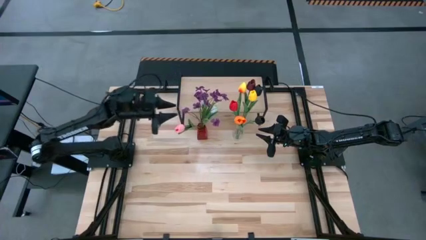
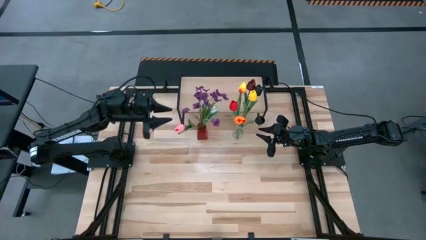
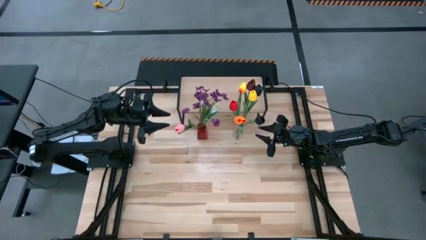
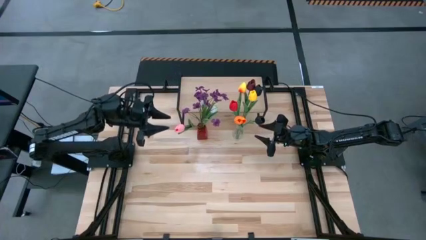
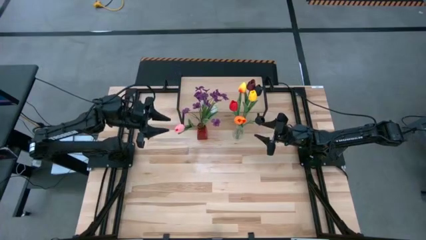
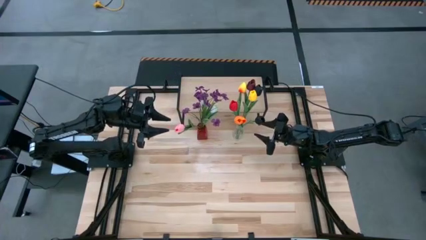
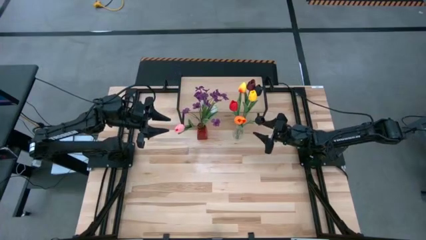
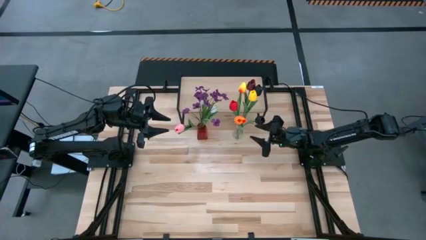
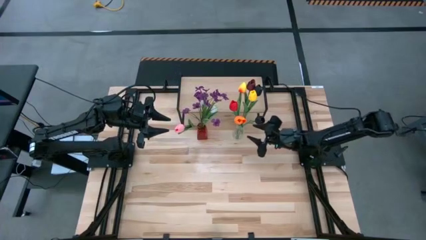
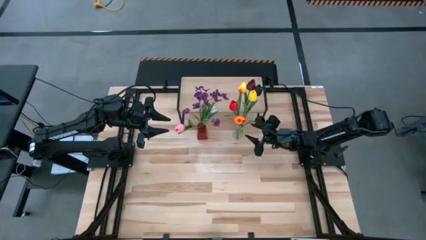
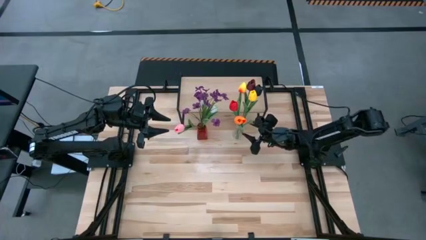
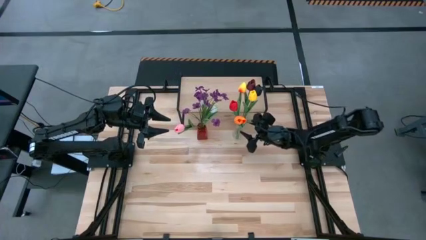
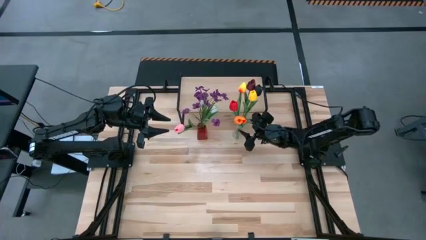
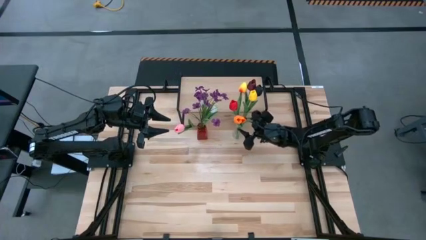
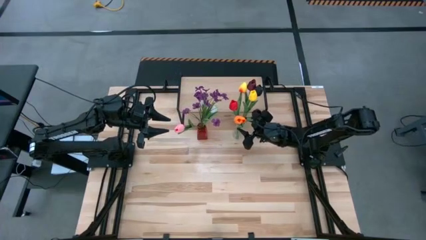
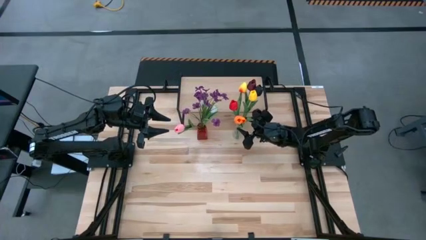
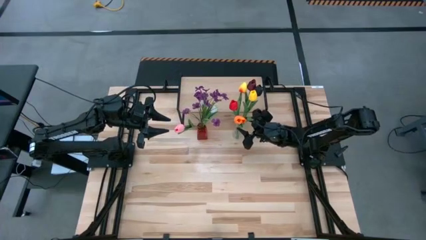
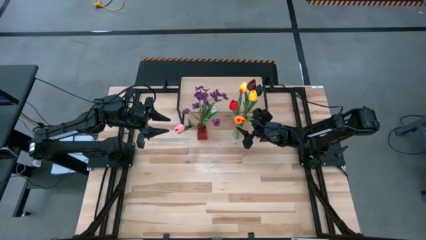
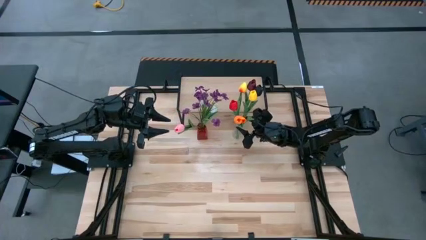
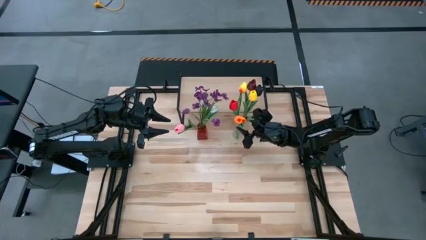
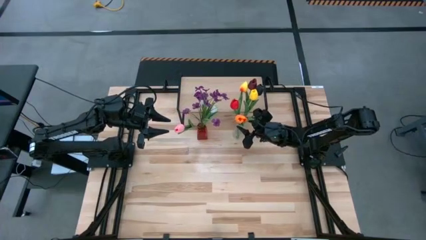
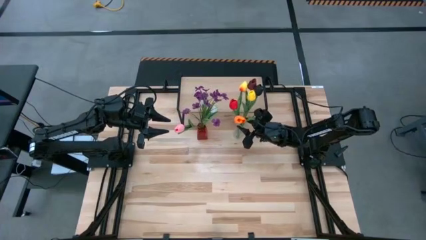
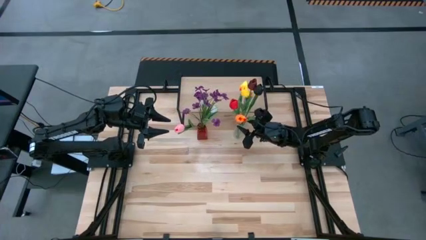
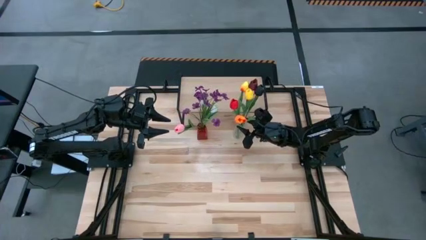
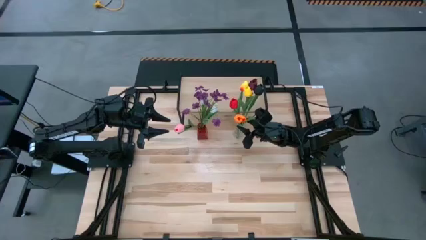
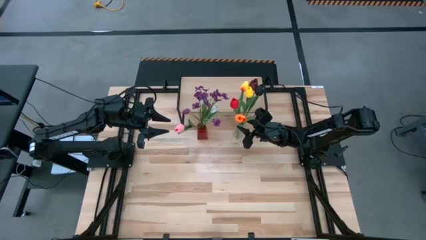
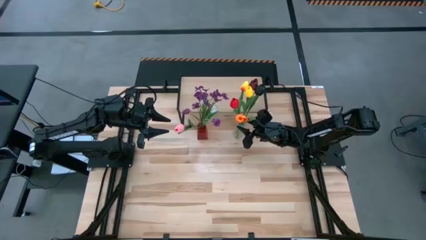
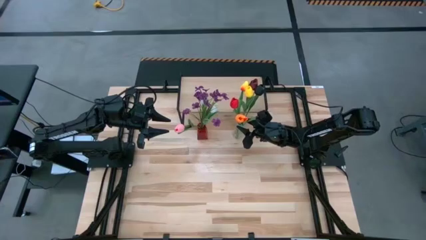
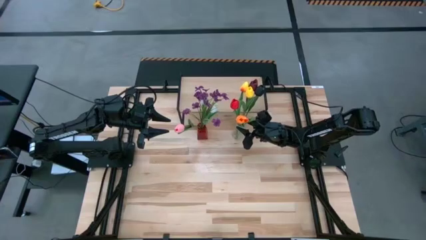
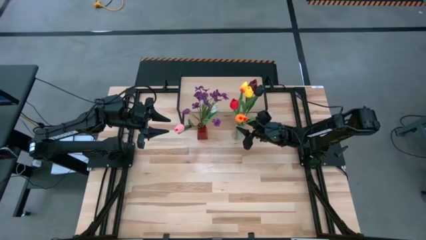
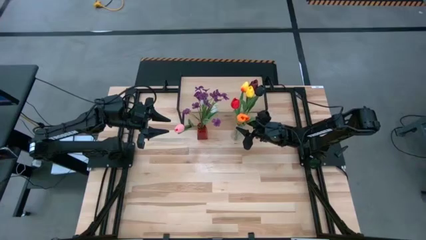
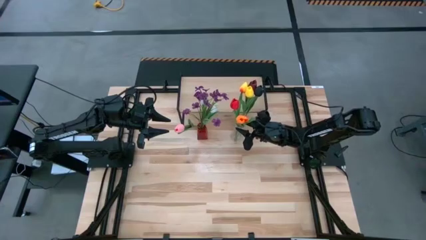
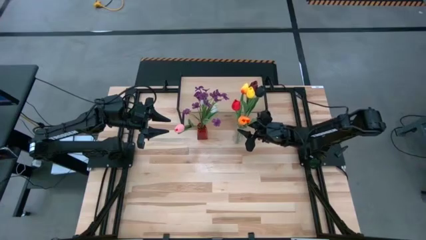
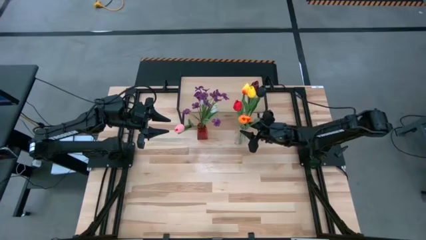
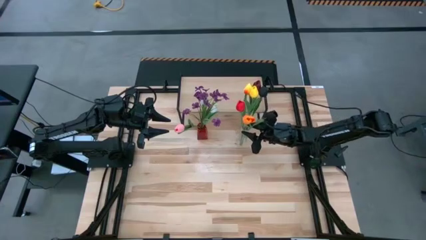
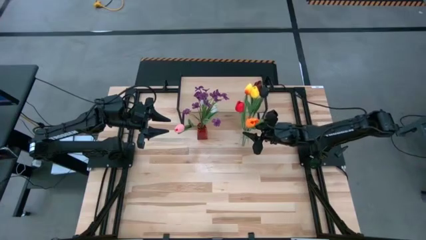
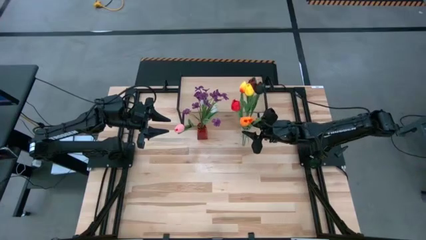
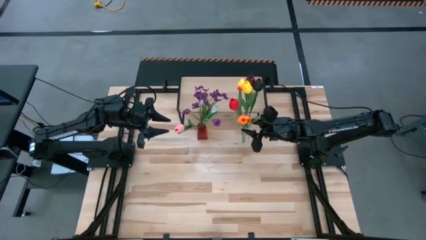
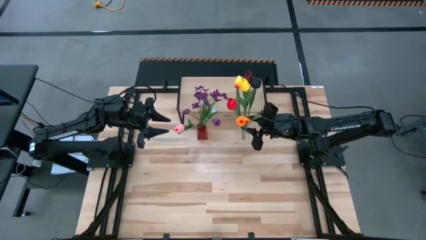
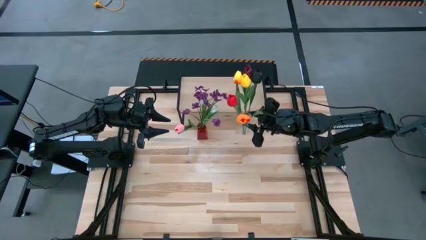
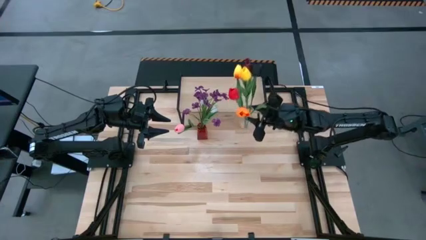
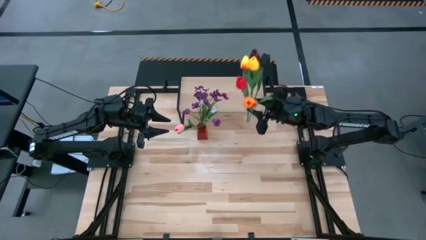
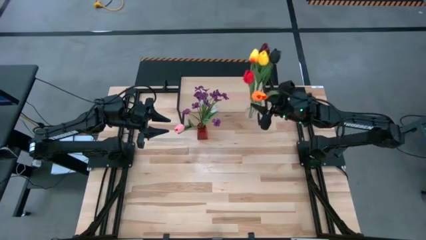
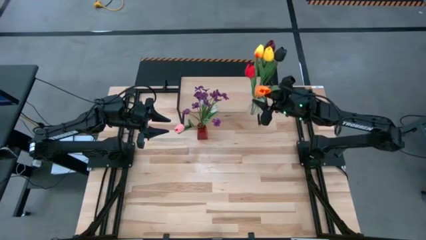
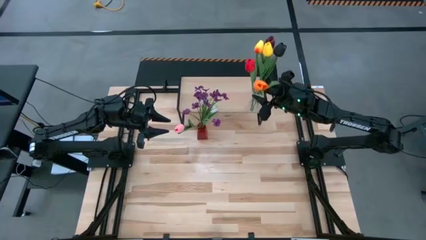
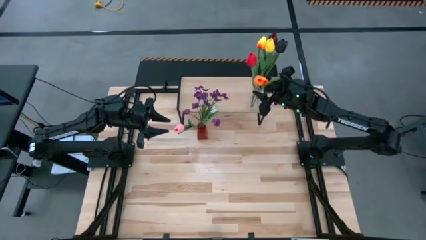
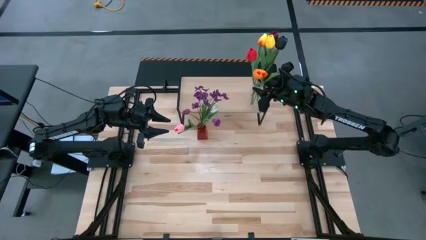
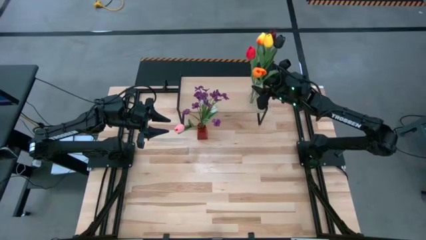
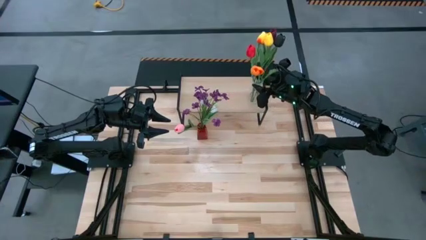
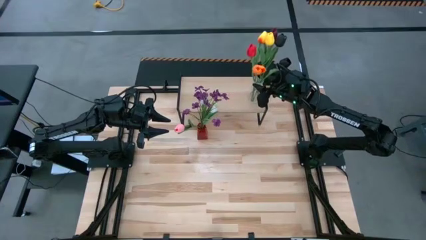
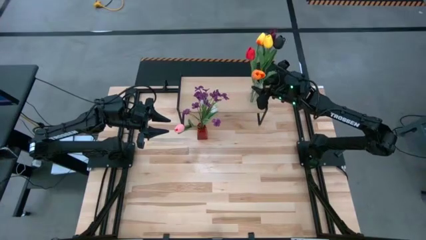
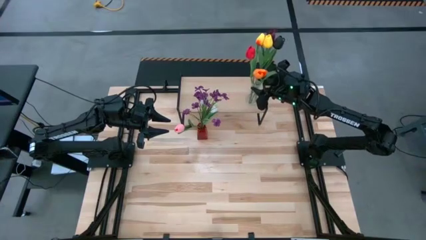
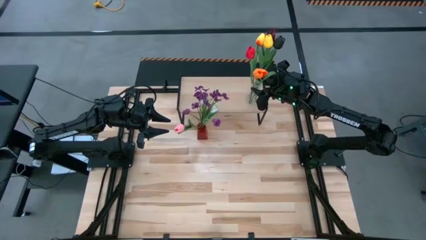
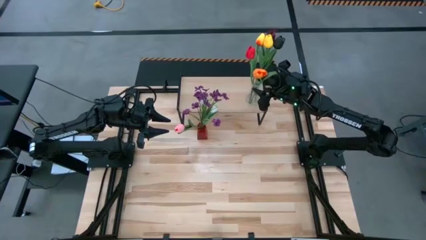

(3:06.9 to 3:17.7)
Task: Pick and place flowers into a vace then onto a shelf
Put the transparent vase with flowers on the shelf
